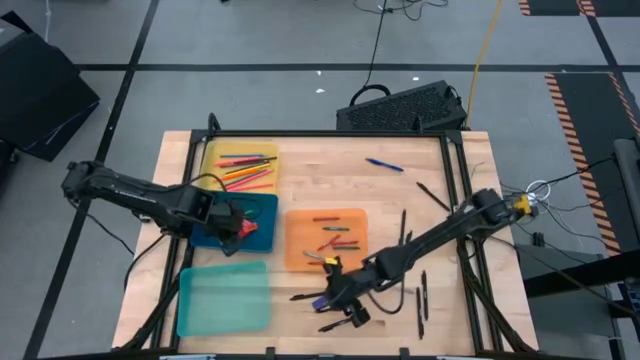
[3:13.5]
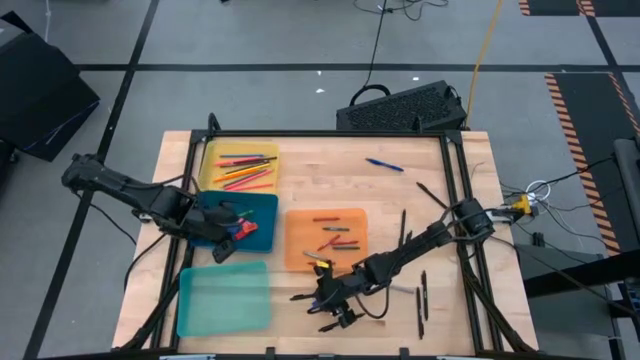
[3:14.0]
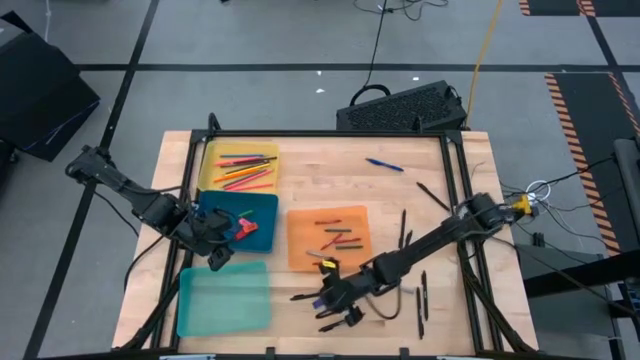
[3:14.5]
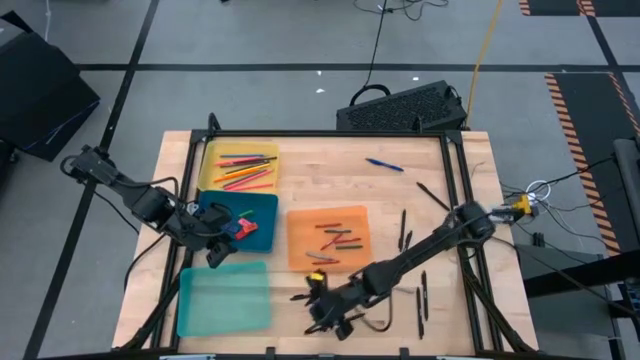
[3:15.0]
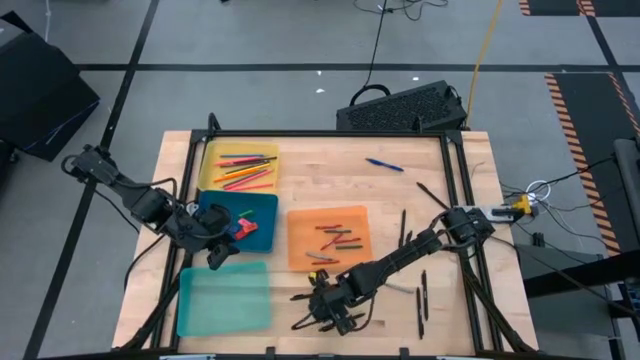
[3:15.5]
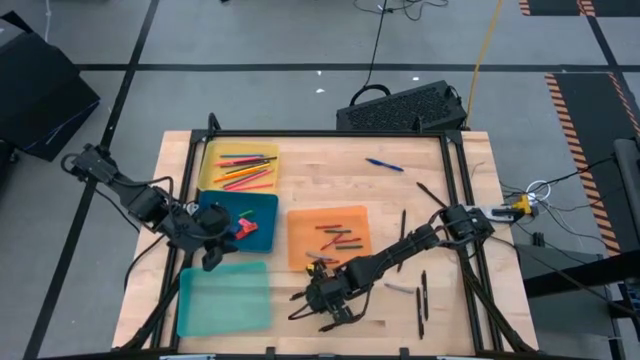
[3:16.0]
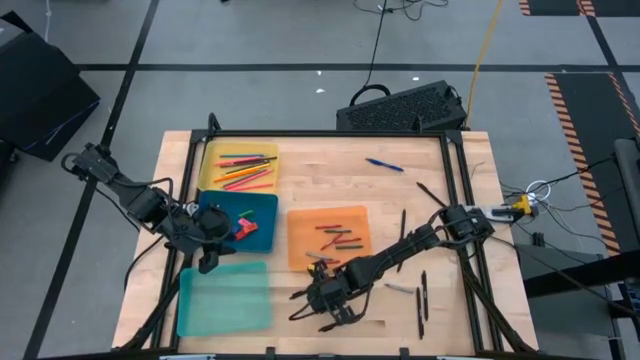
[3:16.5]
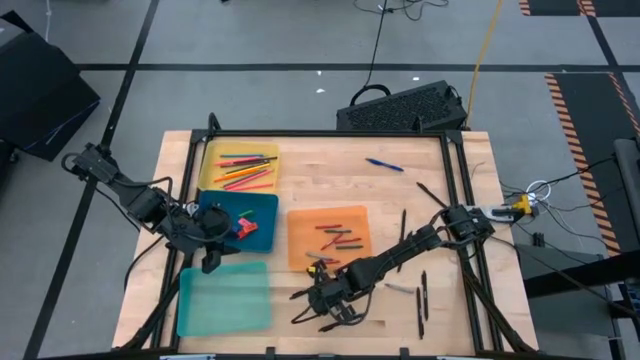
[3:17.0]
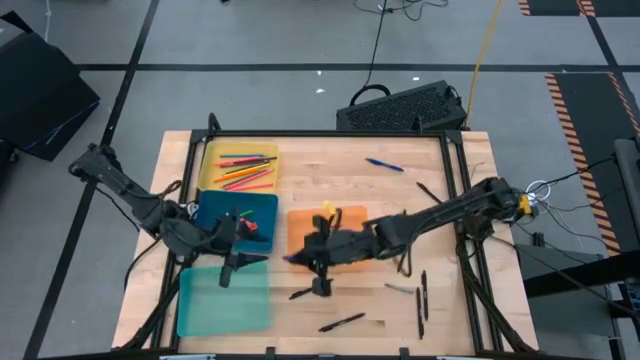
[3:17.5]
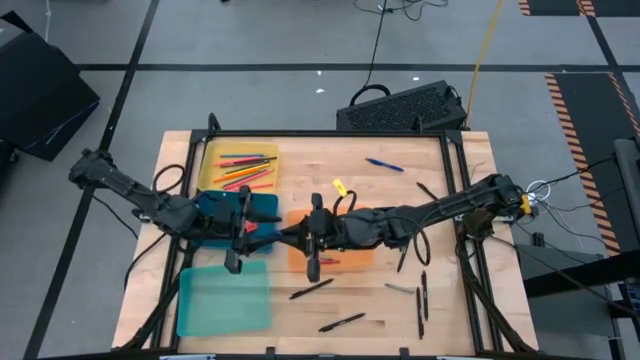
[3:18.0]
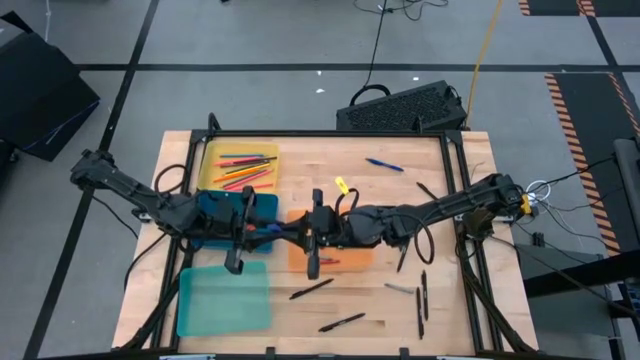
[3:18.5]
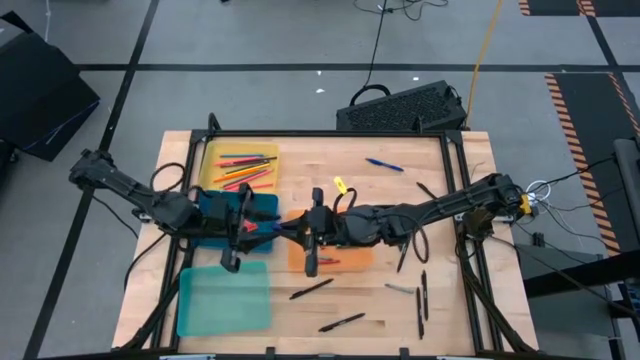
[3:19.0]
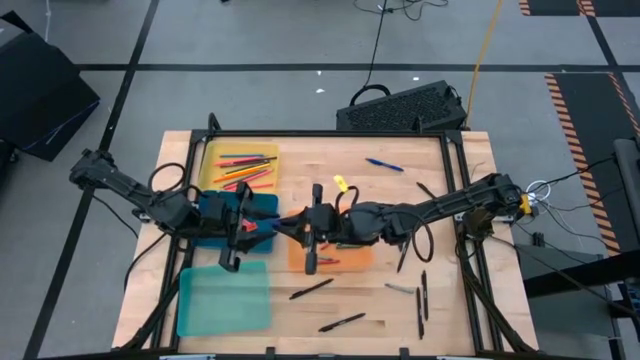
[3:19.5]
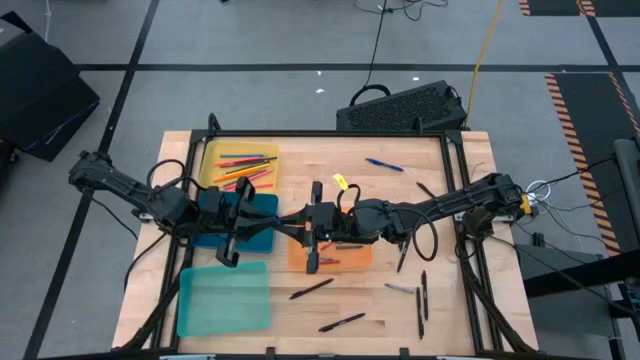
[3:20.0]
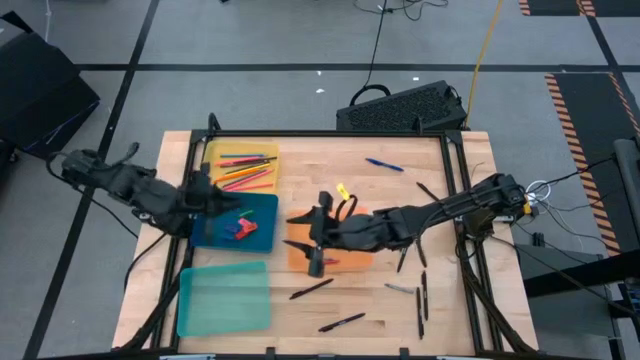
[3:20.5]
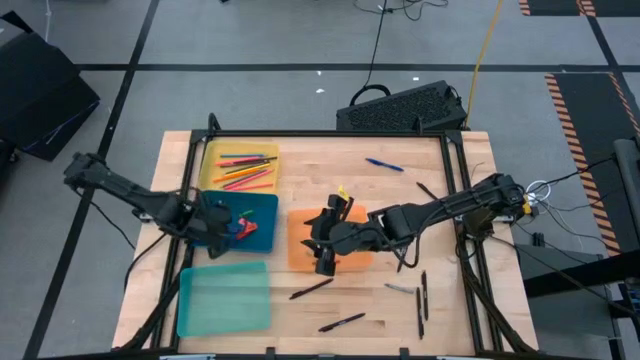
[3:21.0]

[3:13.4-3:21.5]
Task: Sort crayons/erasers/pens/pencils in bins
Put the purple eraser into the blue bin

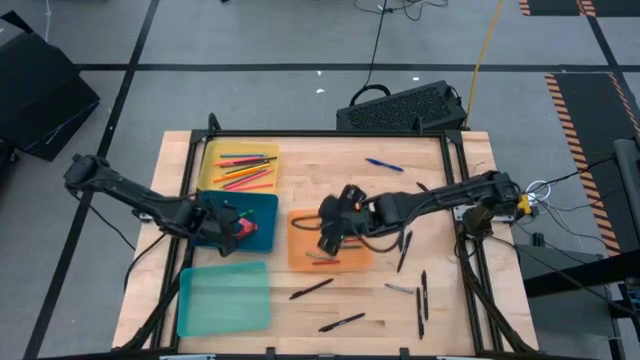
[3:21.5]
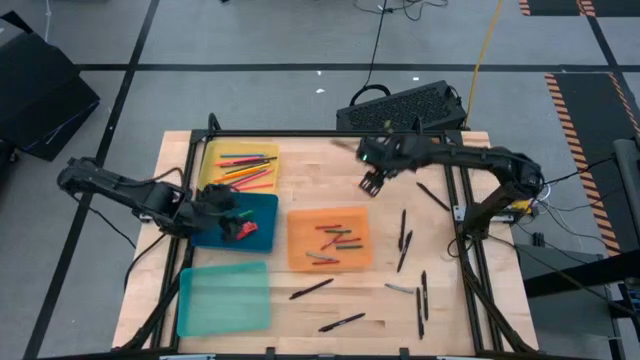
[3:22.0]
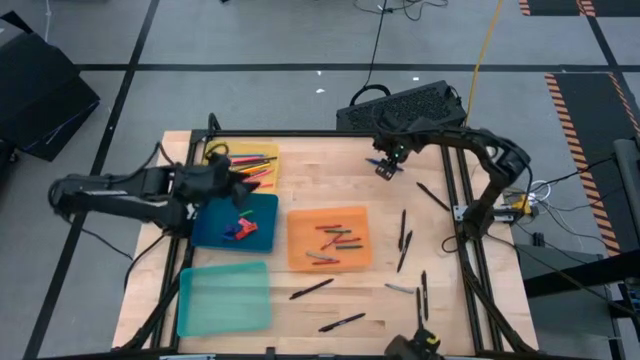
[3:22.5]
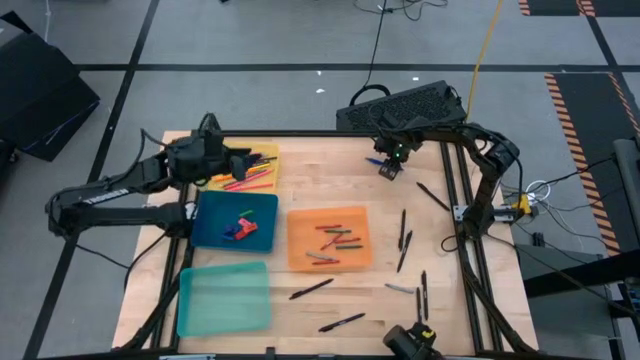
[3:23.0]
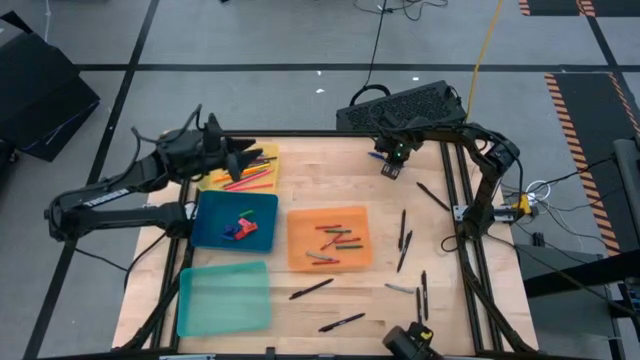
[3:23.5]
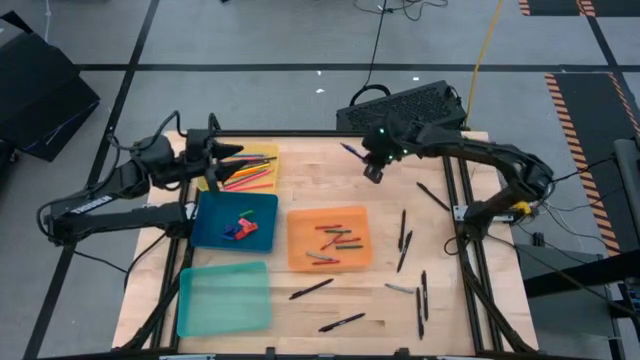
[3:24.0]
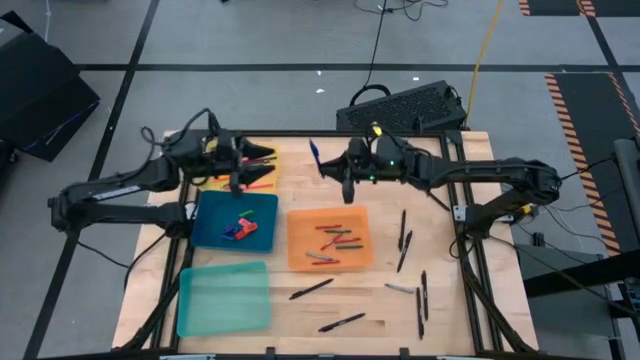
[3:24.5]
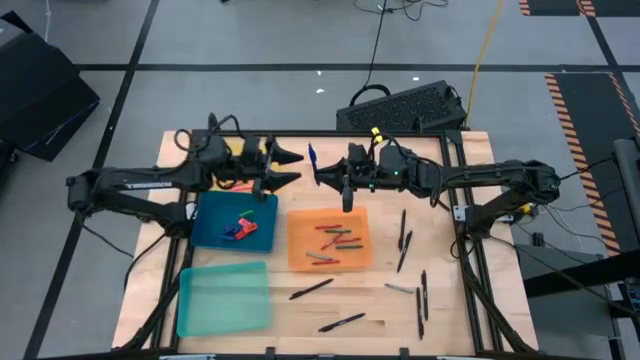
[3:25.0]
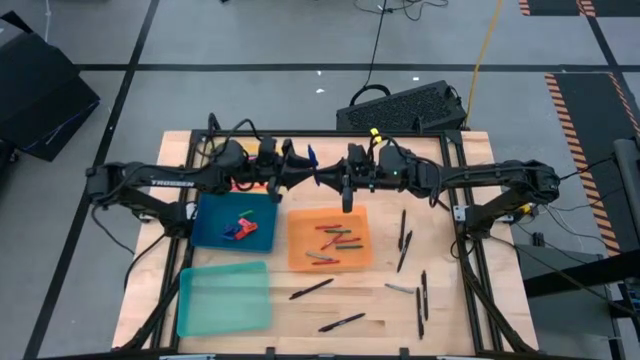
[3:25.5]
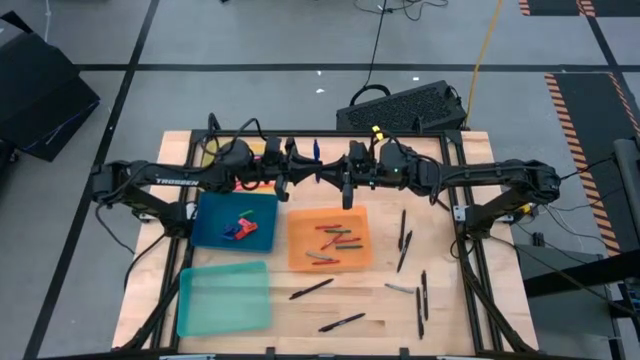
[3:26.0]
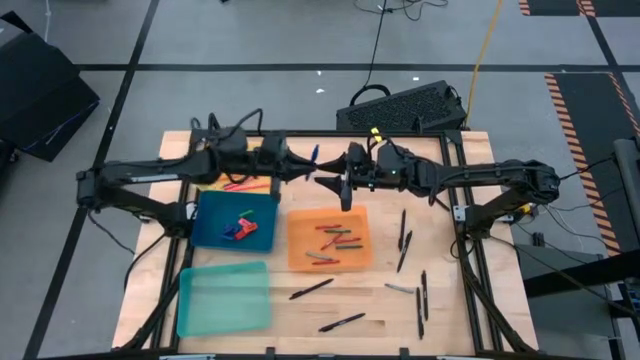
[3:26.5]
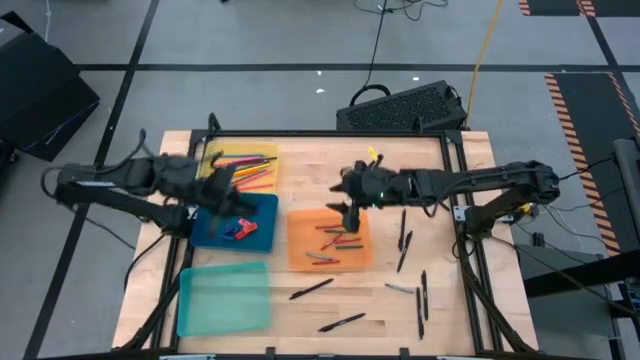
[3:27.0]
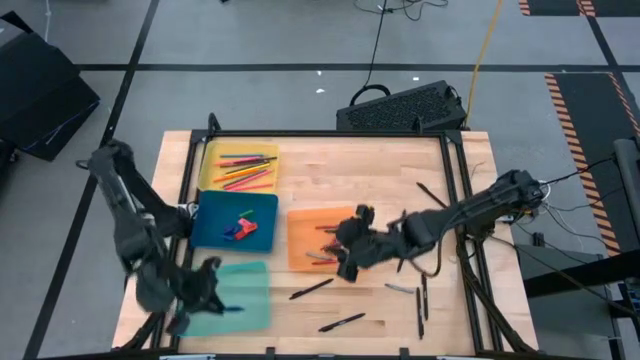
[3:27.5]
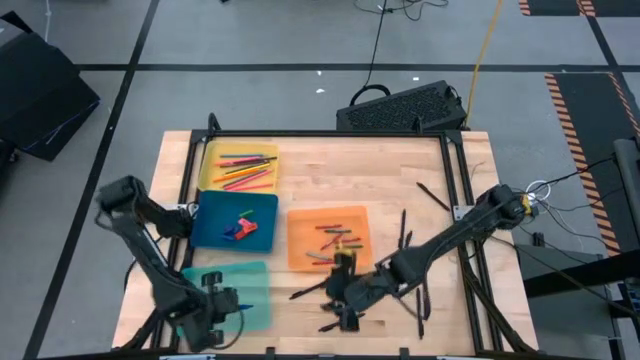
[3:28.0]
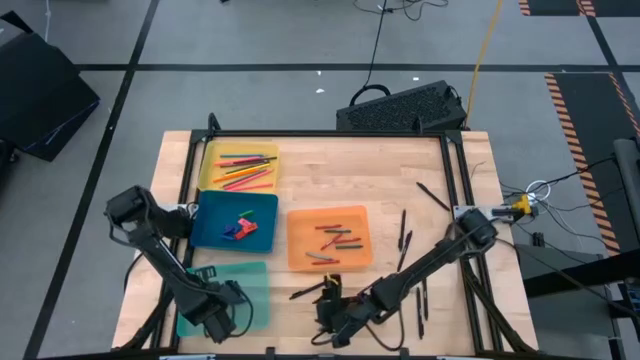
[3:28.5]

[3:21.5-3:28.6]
Put the blue pen into the green bin

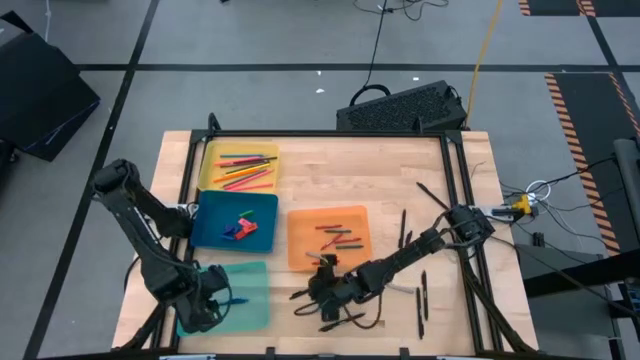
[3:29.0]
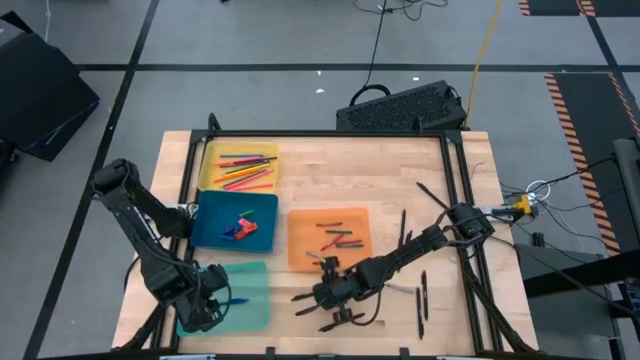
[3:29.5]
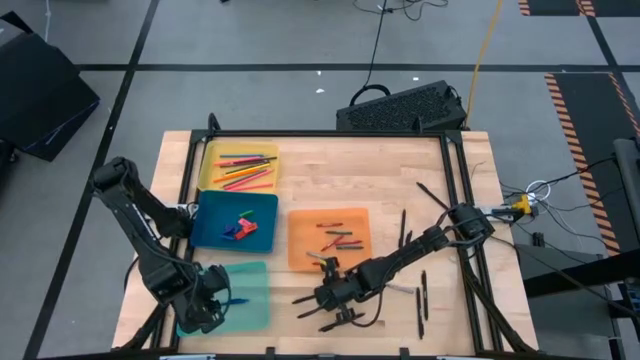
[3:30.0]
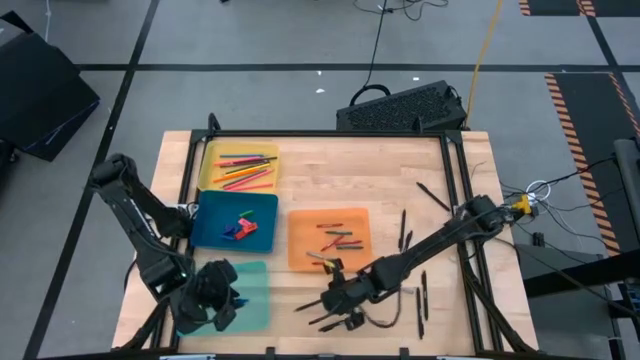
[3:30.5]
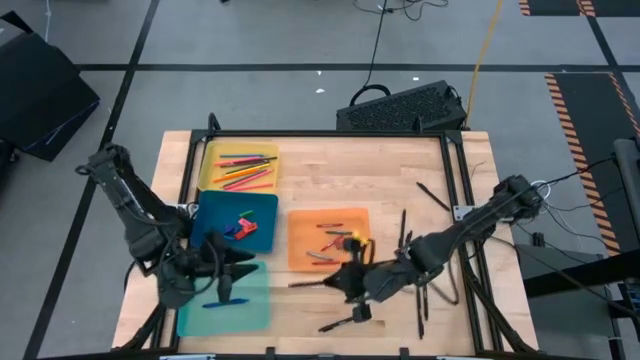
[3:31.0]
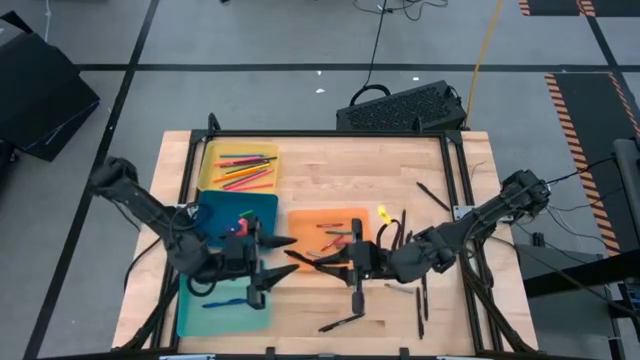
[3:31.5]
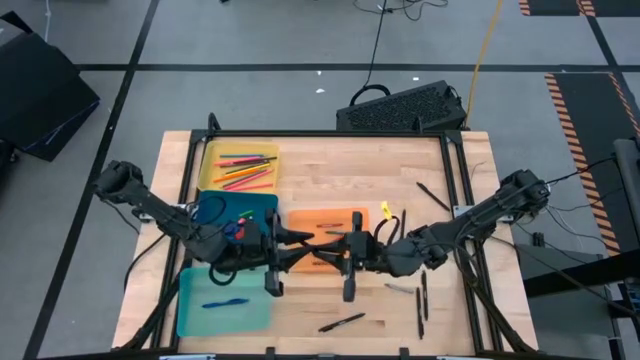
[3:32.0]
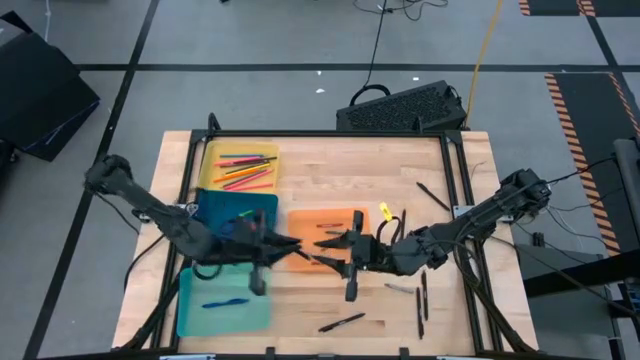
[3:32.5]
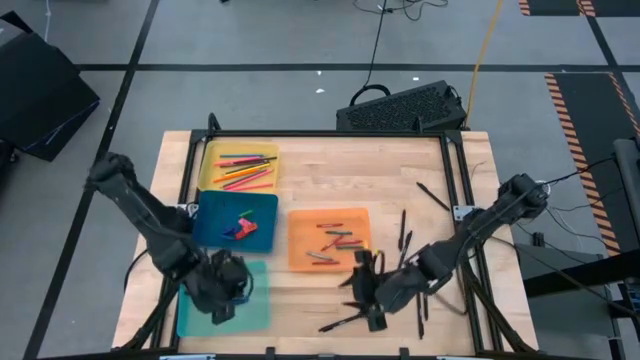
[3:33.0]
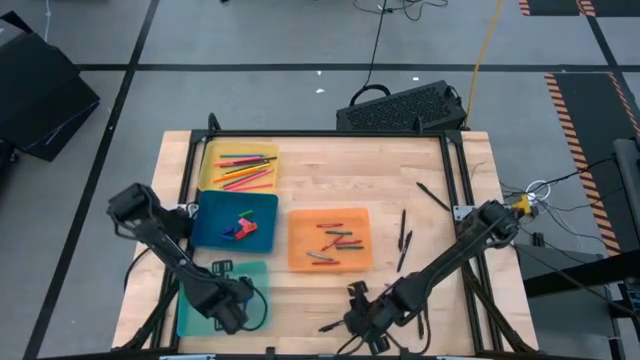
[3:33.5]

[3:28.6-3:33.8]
Put the black pen into the green bin

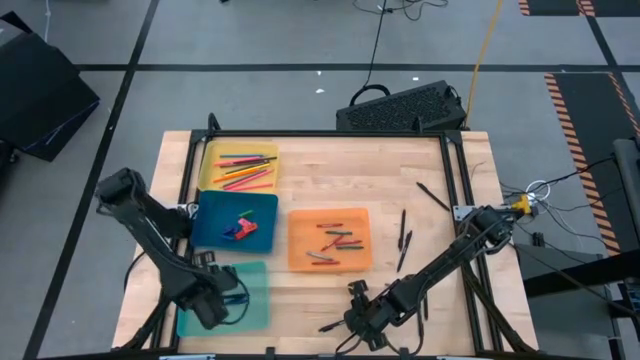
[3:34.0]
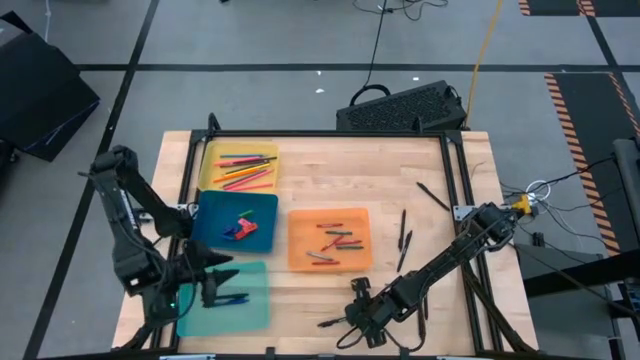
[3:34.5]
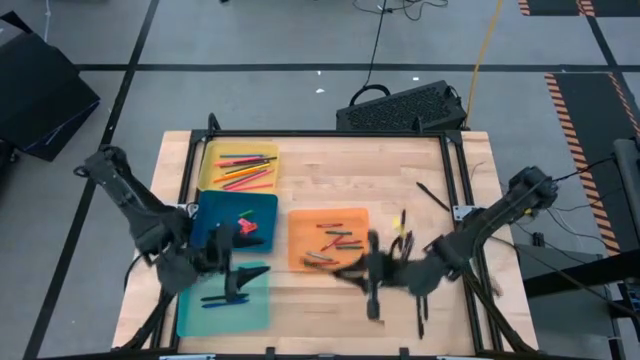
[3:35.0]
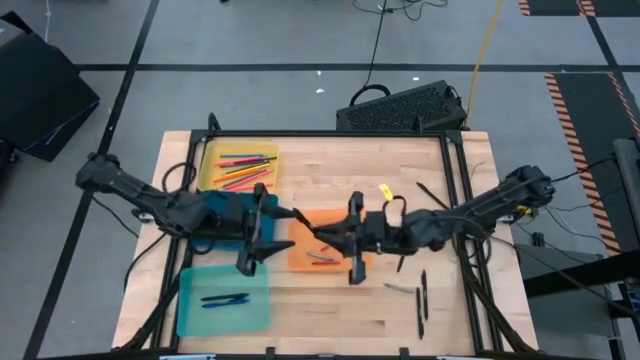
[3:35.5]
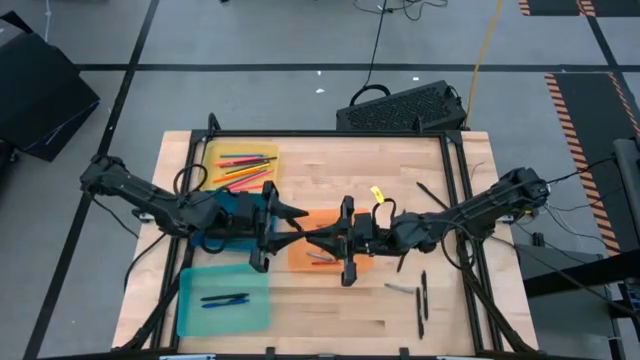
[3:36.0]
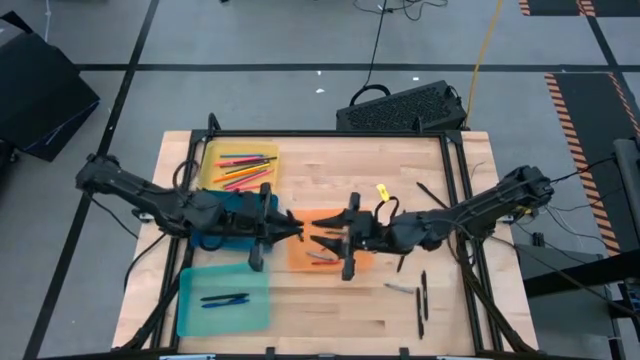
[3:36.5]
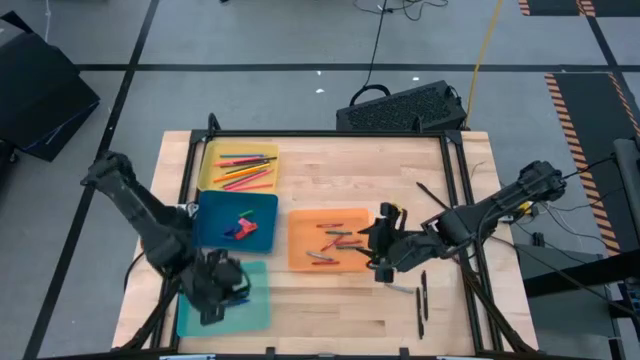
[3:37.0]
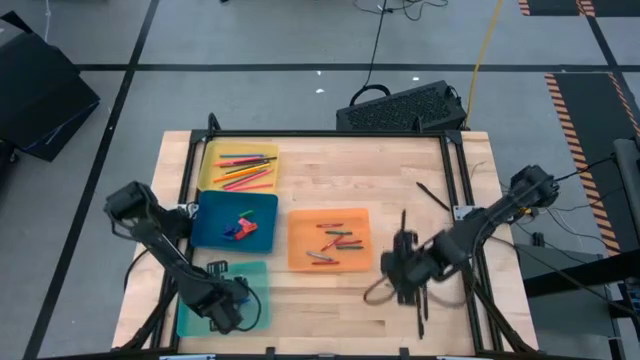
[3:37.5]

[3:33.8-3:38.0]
Put the black pen into the green bin
